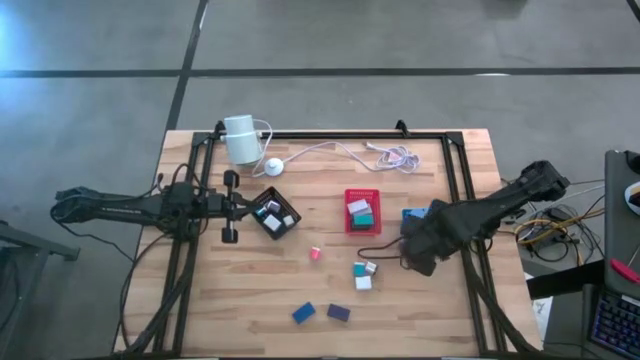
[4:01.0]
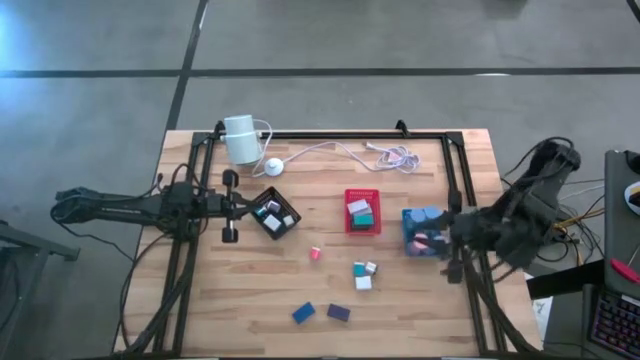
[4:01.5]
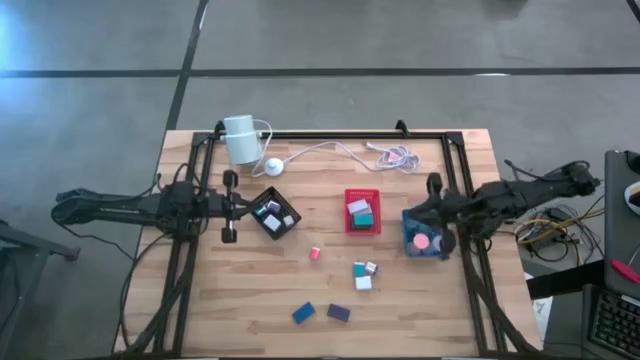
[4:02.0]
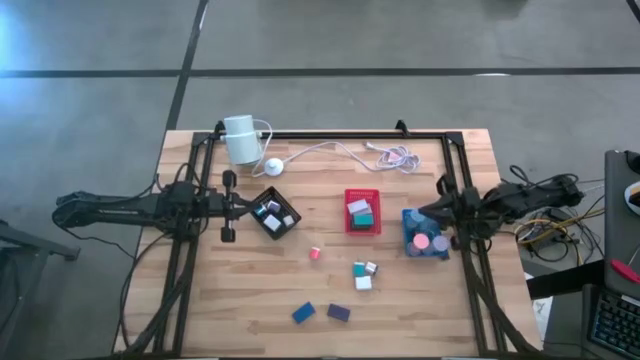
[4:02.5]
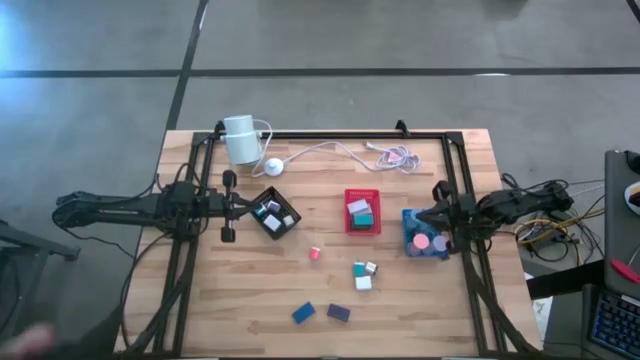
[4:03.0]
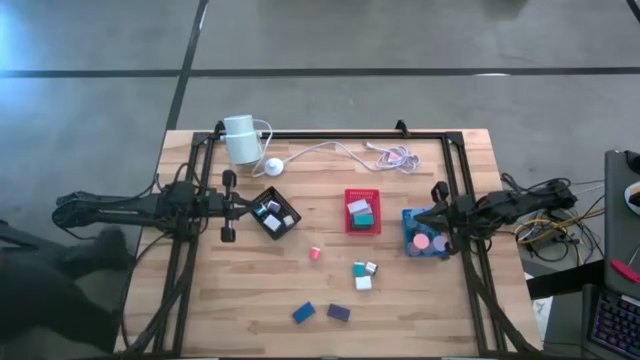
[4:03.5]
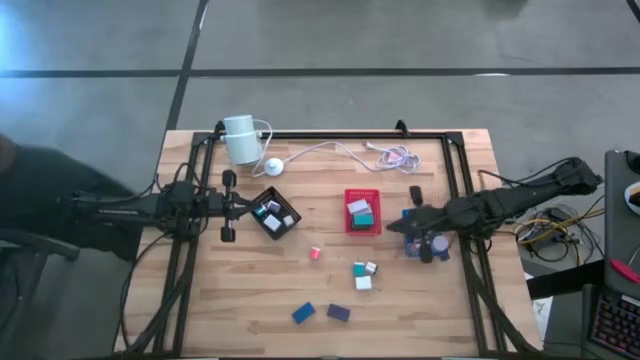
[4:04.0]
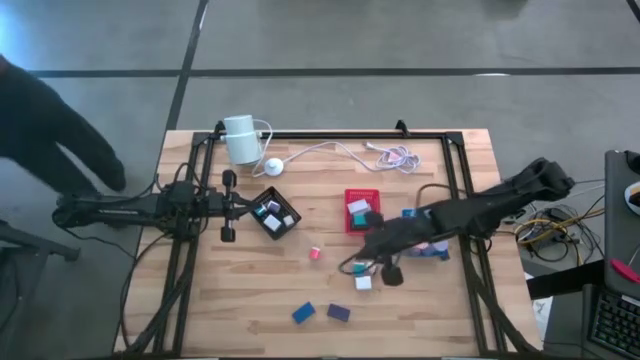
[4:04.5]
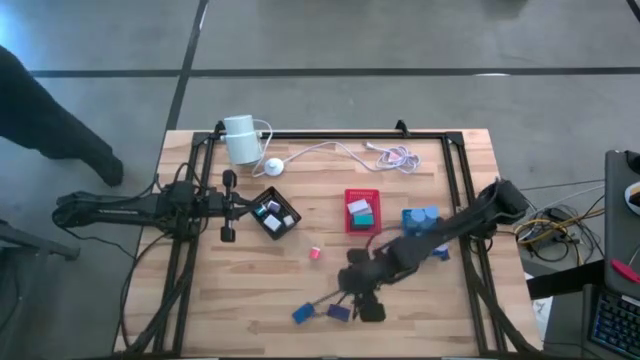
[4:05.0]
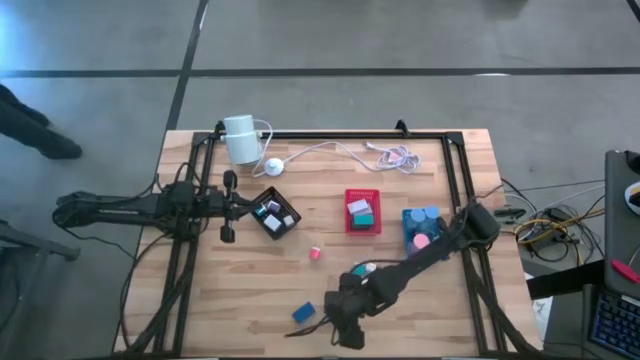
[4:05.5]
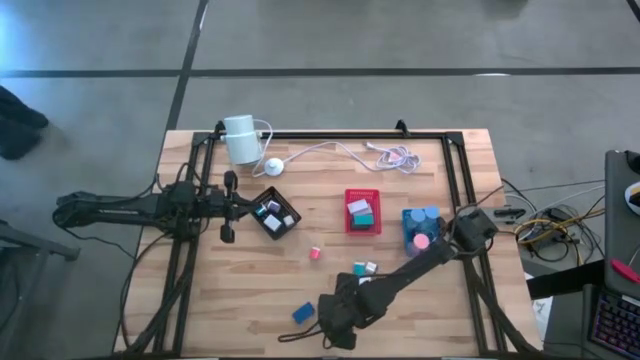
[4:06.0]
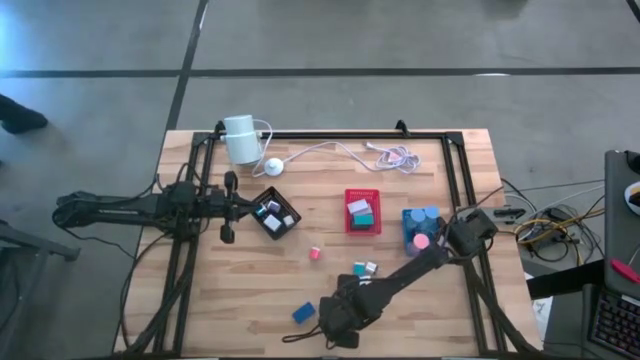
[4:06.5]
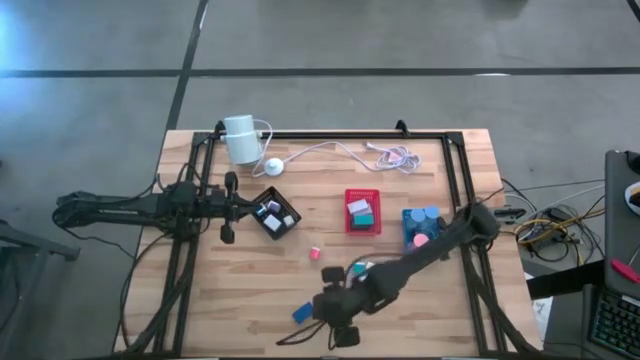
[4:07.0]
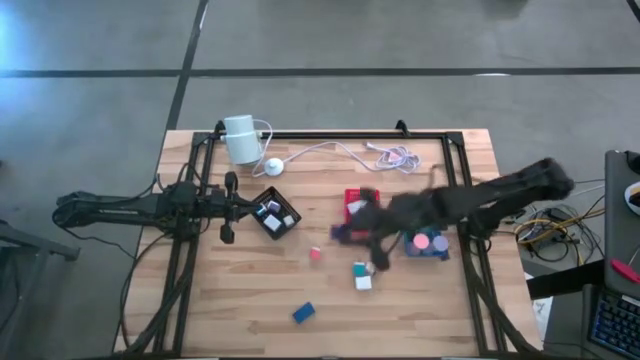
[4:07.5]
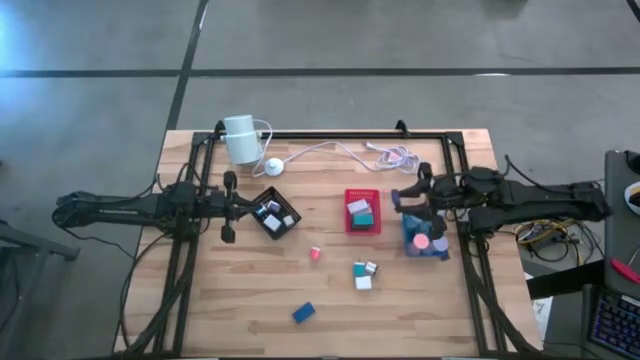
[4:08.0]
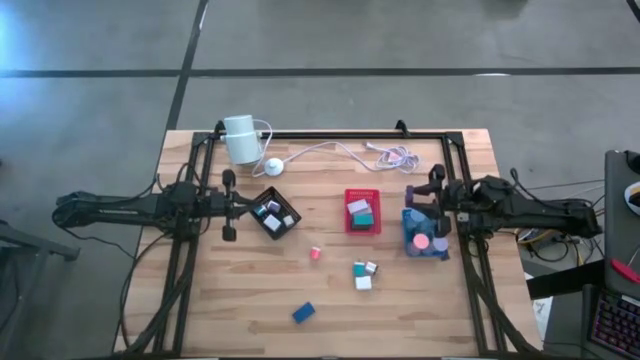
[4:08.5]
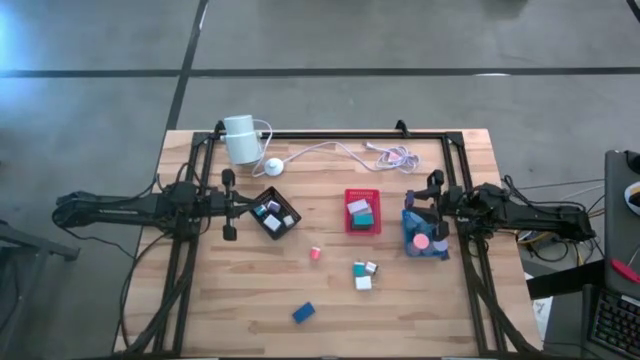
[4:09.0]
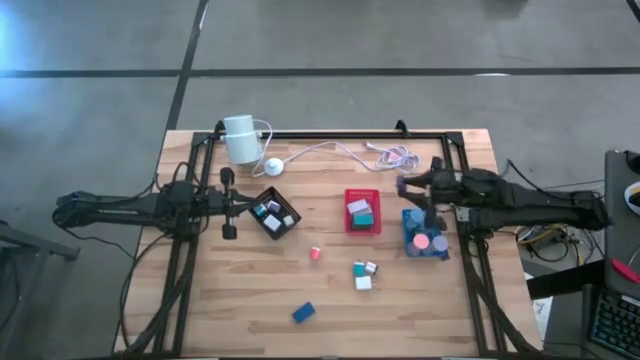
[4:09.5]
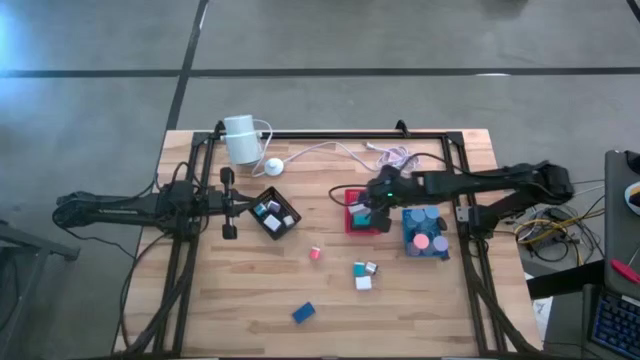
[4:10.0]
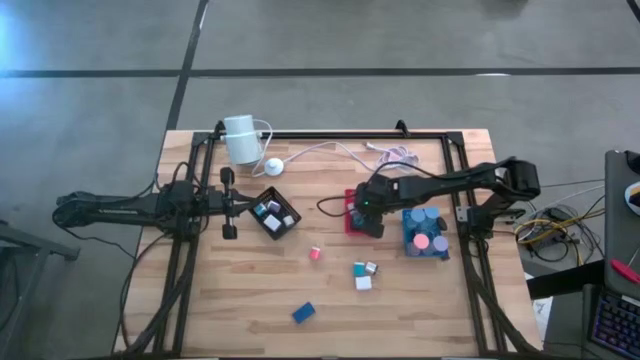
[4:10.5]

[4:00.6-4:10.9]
Task: Pick & Place Office items
Put the bottom violet digital clock into the red bin

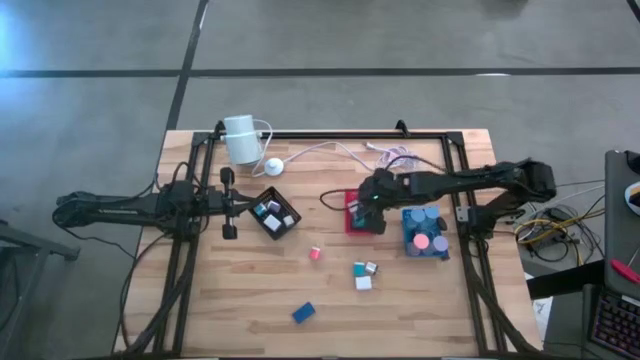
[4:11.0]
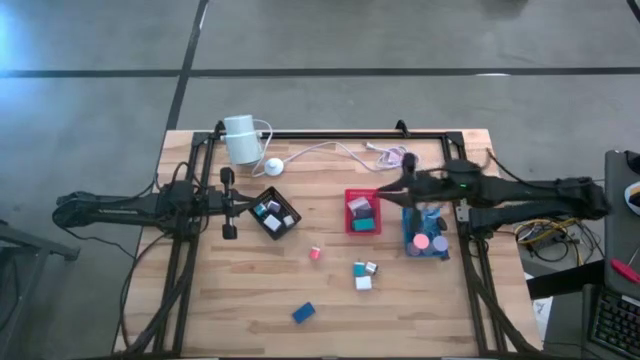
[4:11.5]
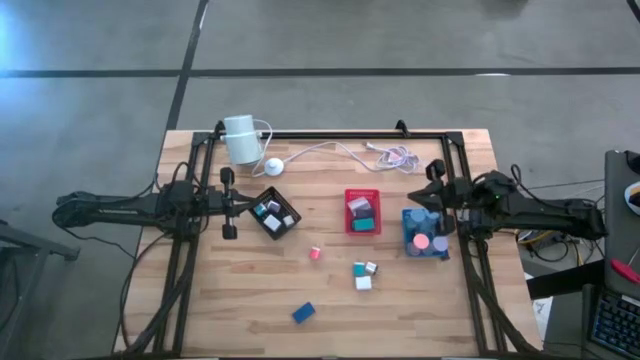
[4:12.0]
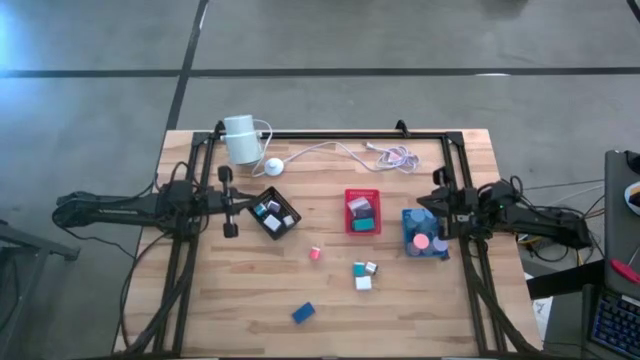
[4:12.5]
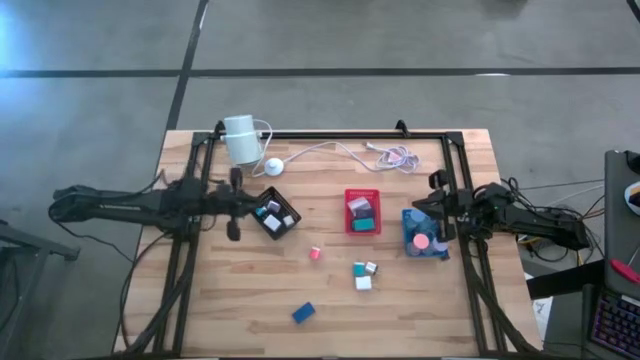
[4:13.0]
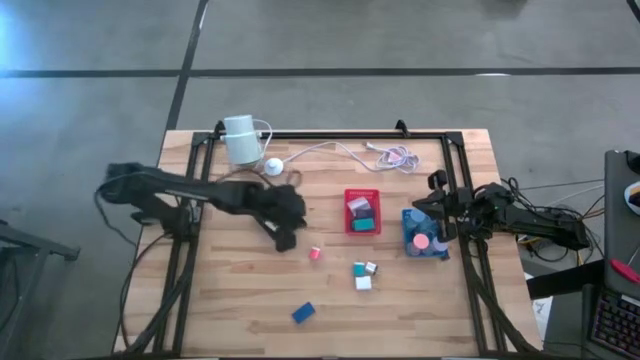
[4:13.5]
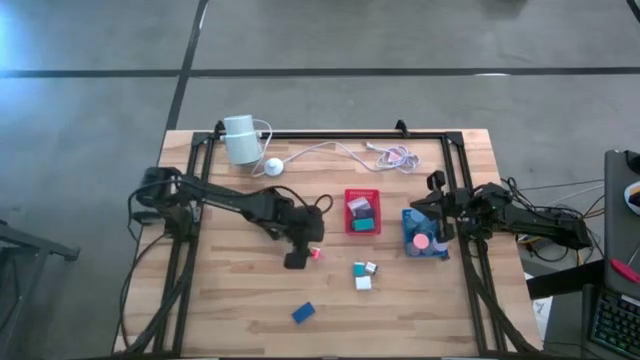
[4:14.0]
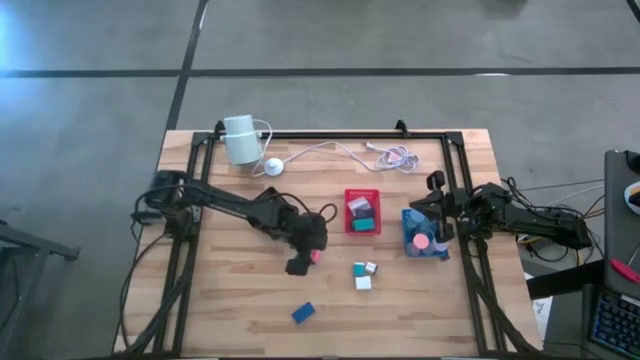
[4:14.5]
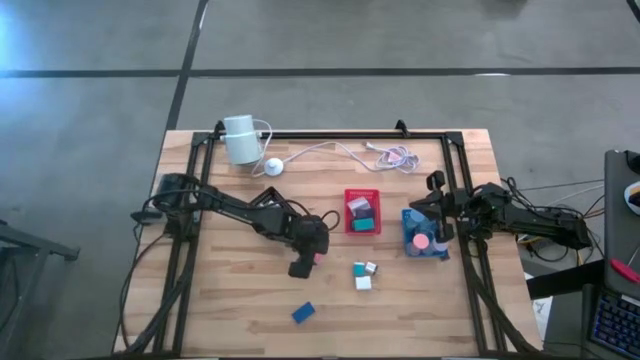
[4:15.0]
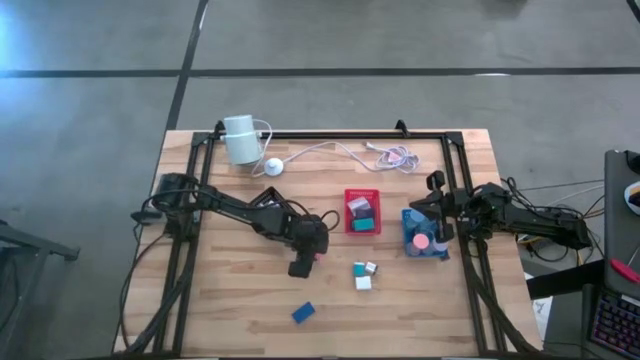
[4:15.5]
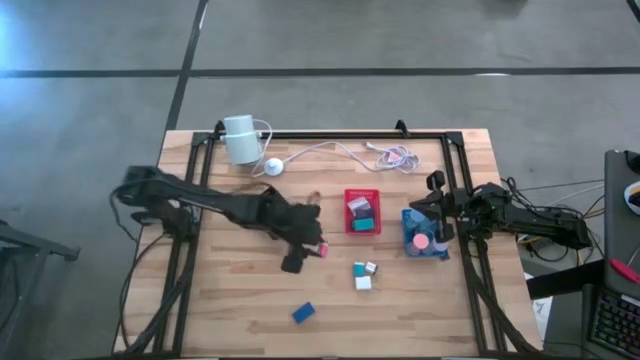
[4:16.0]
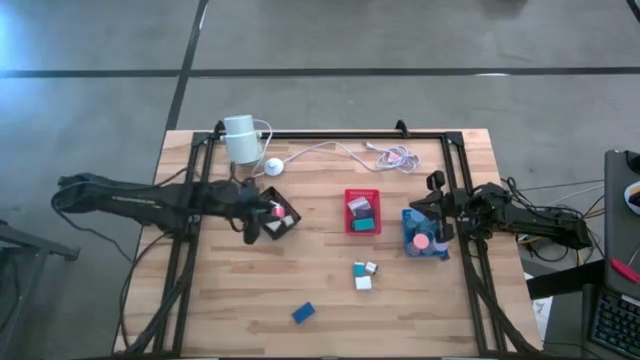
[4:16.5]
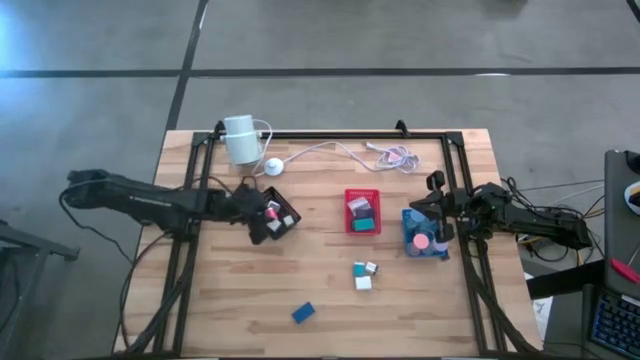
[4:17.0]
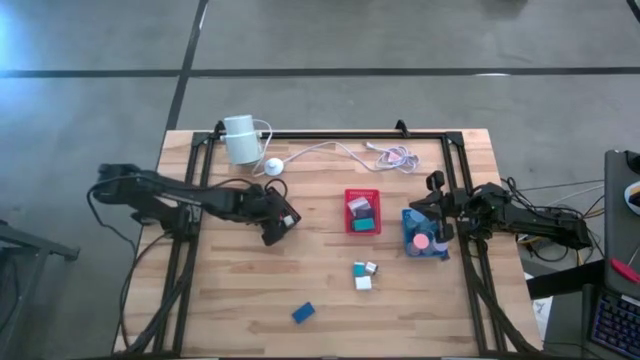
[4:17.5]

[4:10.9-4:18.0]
Put the pink charger adaptor into the black bin
